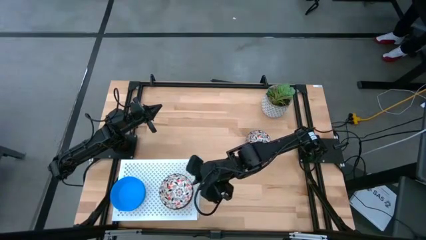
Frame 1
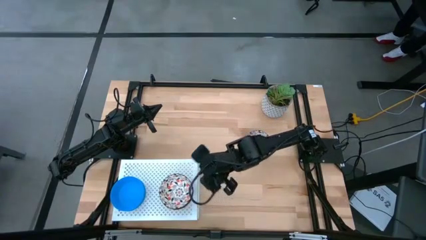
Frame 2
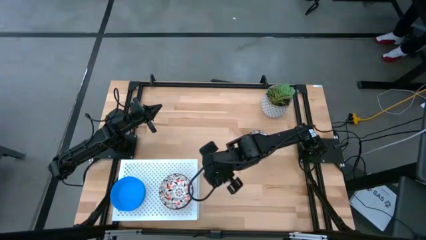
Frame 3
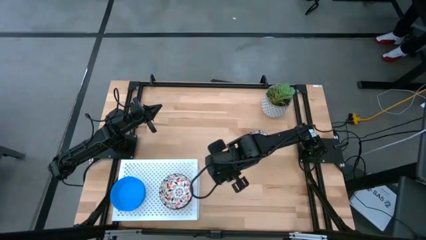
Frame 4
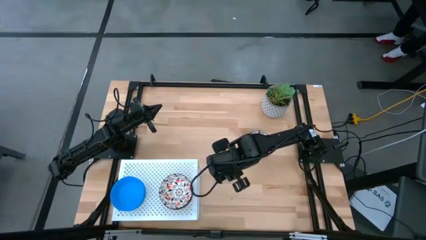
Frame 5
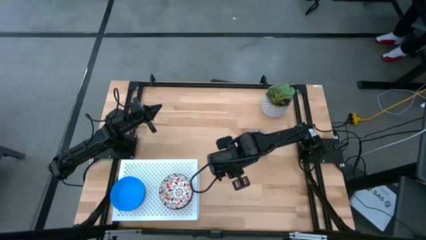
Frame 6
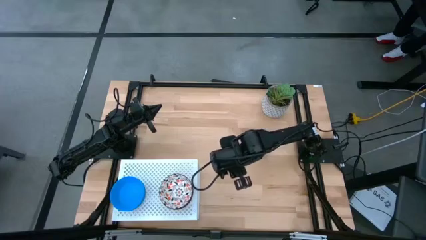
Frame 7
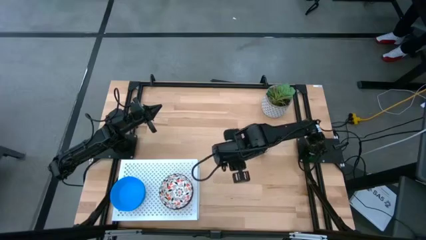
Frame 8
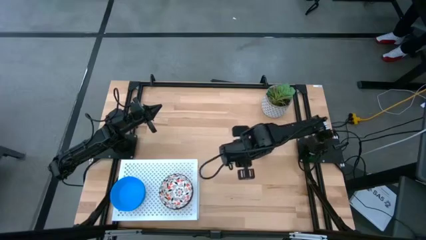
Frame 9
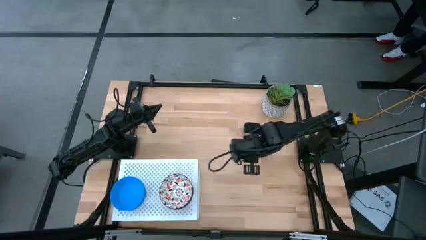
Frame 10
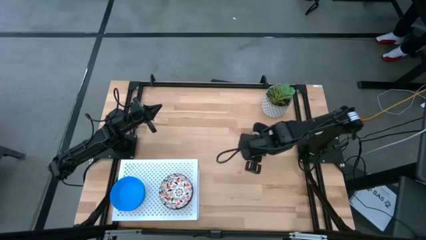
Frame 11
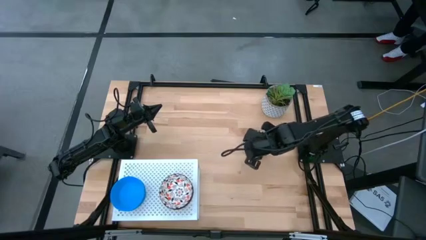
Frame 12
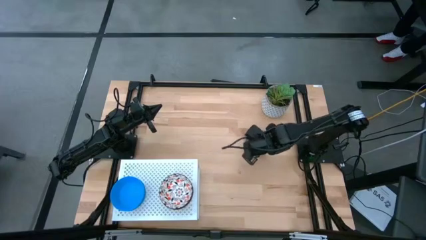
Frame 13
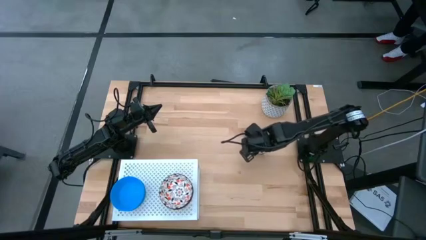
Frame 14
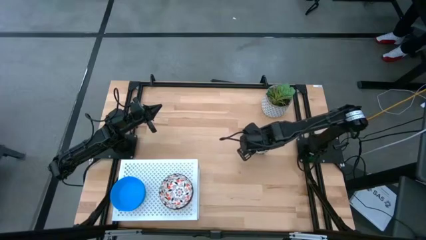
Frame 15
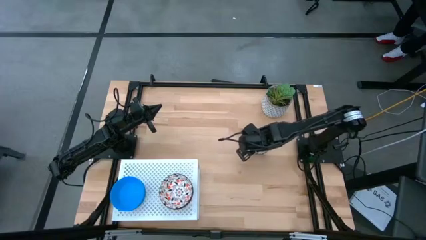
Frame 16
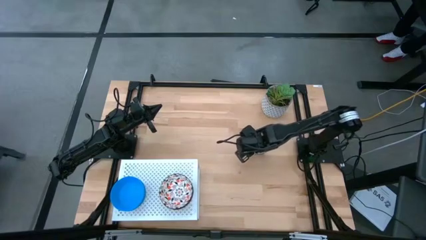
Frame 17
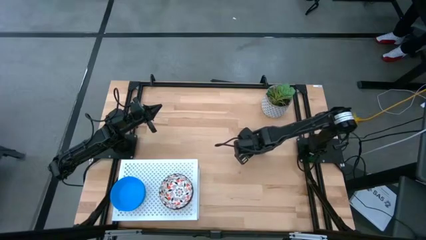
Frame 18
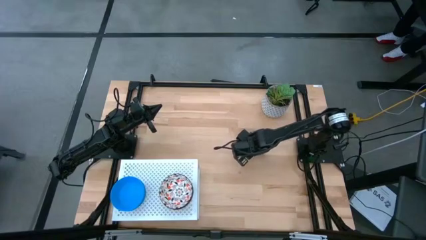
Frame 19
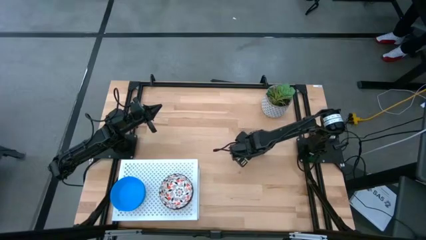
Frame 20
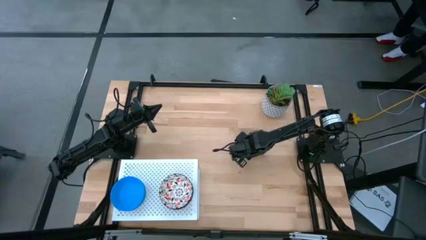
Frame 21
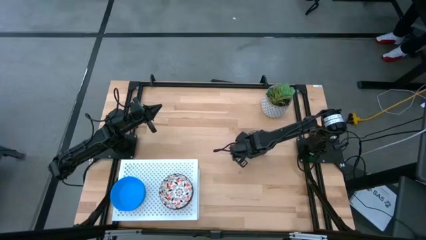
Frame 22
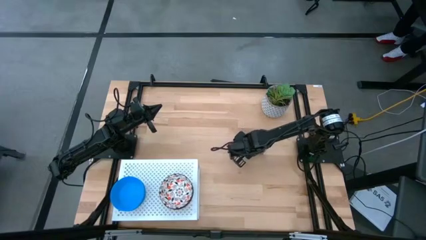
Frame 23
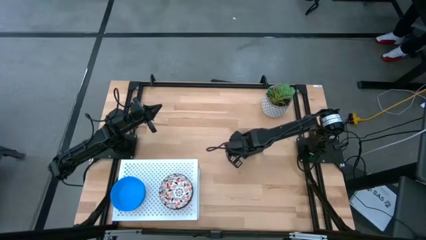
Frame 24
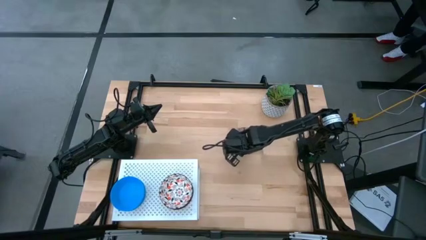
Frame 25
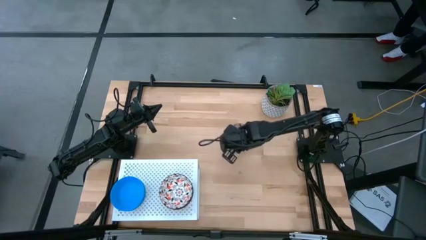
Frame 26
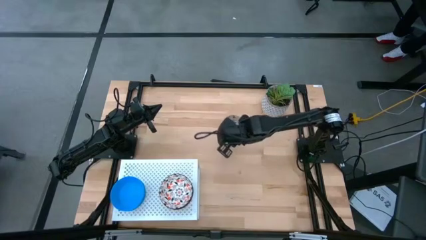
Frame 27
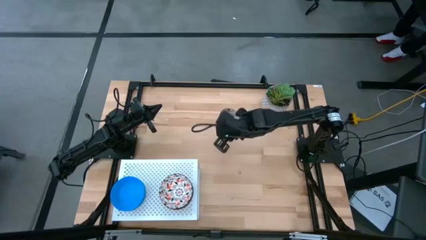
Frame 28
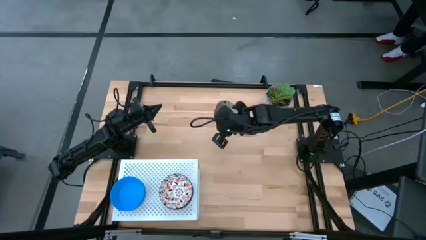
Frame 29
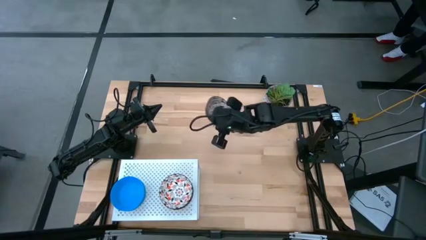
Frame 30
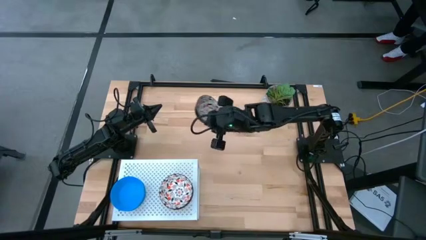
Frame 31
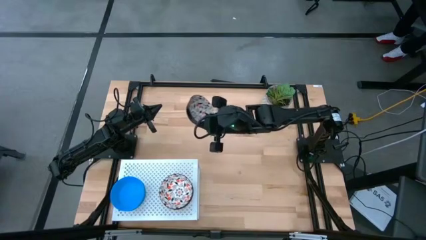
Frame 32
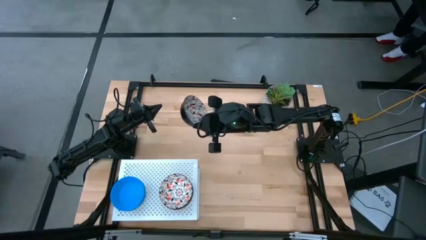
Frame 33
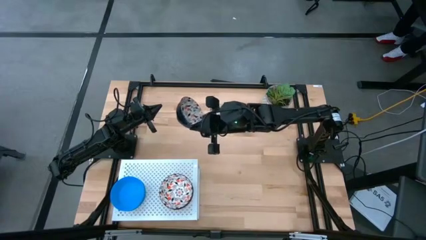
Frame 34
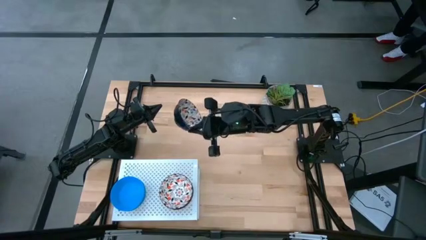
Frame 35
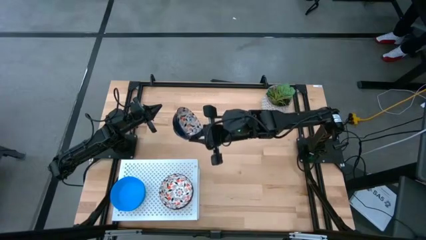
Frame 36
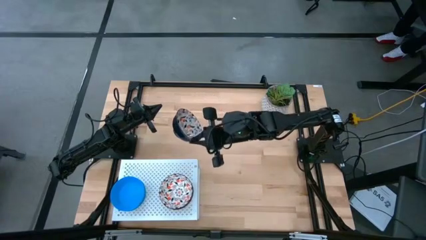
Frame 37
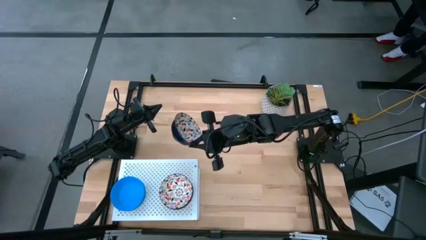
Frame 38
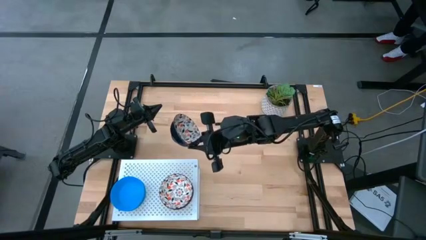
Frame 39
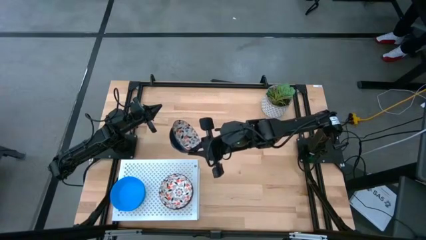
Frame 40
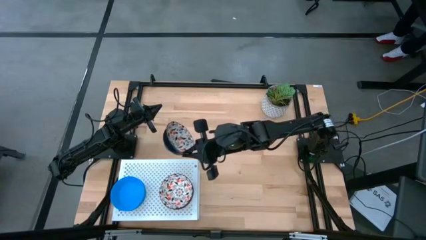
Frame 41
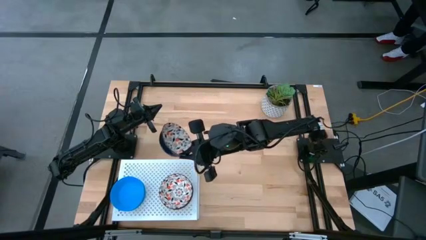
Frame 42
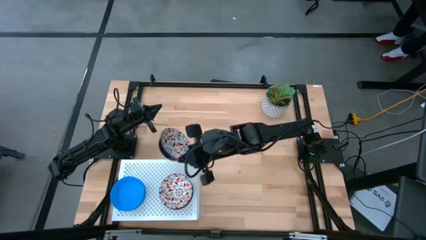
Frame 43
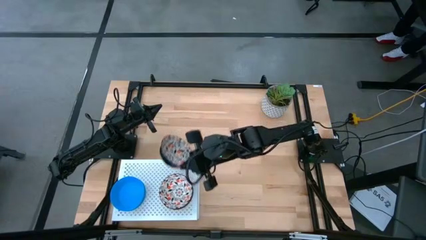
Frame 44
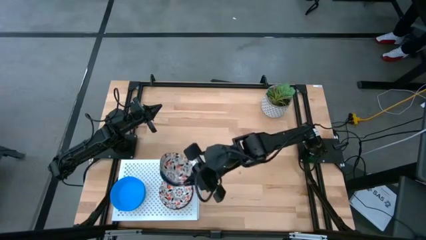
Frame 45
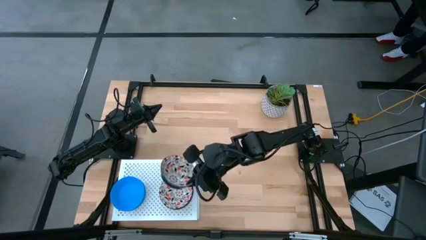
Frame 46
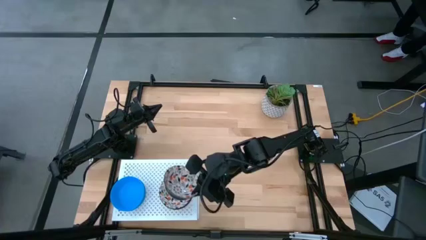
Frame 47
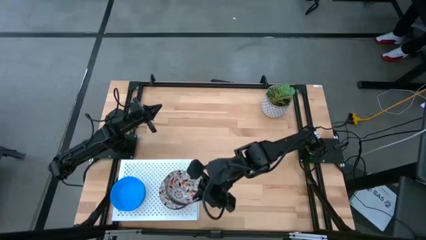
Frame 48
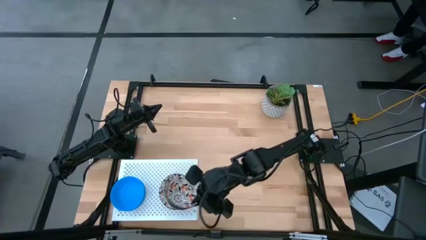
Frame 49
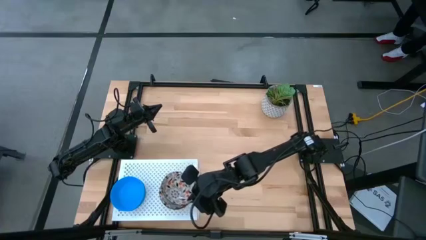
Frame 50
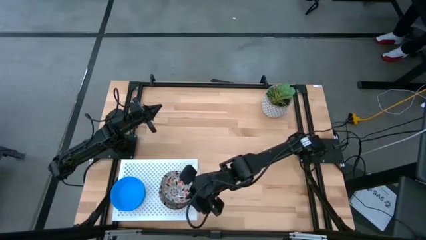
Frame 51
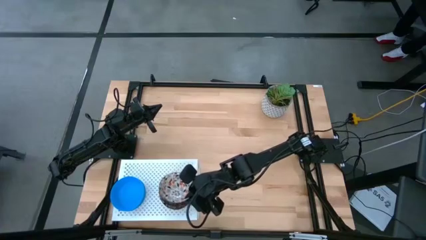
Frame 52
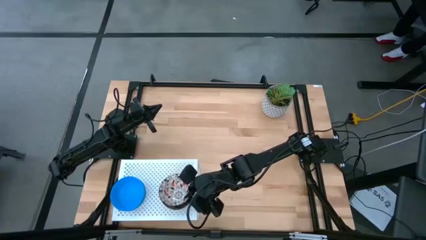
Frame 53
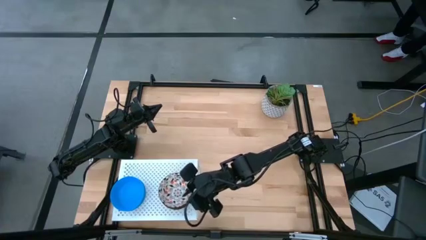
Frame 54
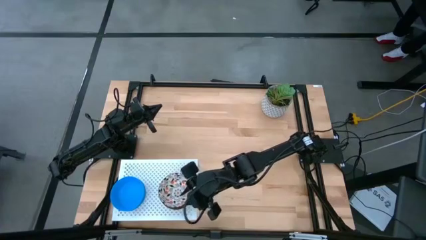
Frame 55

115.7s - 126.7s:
Task: Pick & Place Mini bowls
Stack the patterned bowl on the stacked patterned bowls on the shelf

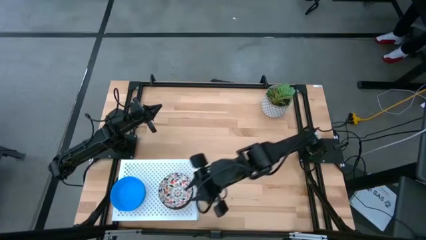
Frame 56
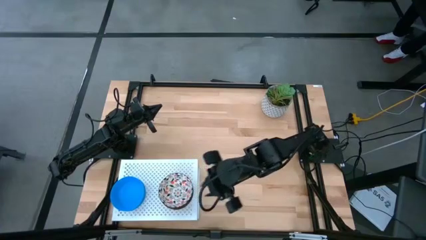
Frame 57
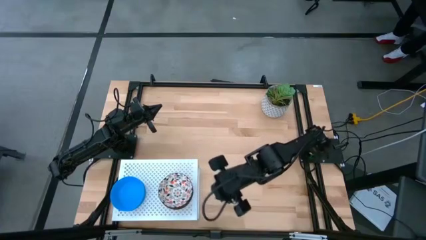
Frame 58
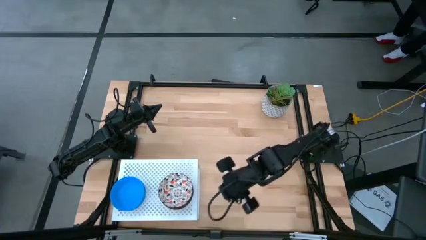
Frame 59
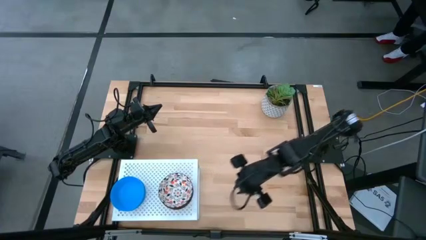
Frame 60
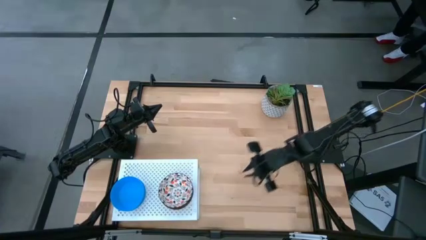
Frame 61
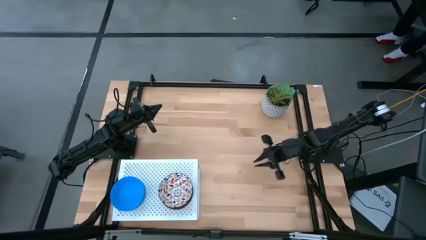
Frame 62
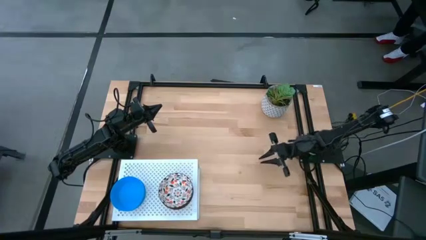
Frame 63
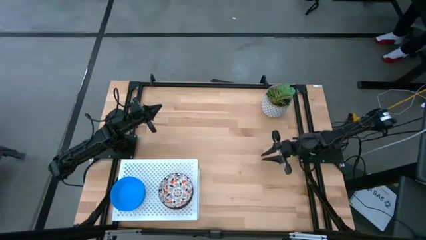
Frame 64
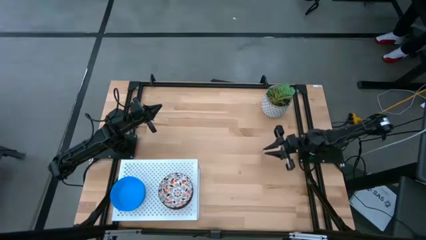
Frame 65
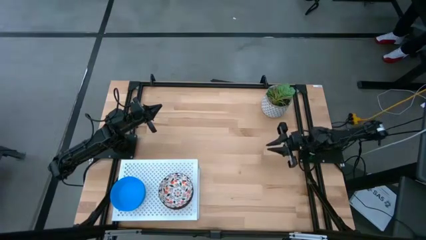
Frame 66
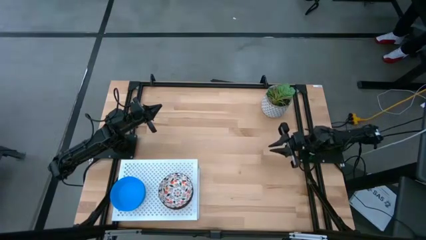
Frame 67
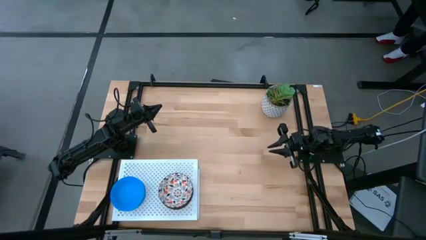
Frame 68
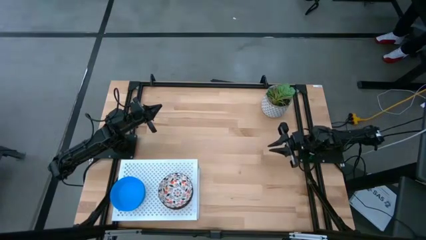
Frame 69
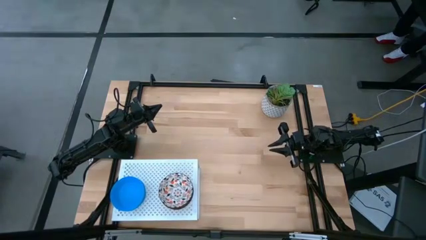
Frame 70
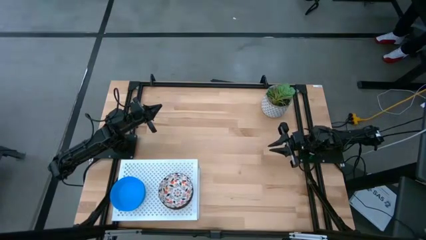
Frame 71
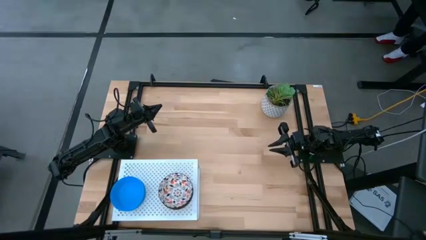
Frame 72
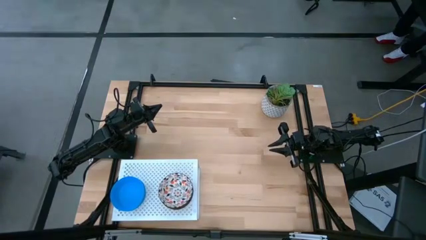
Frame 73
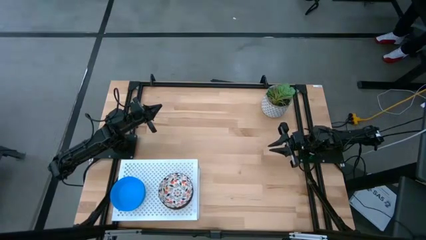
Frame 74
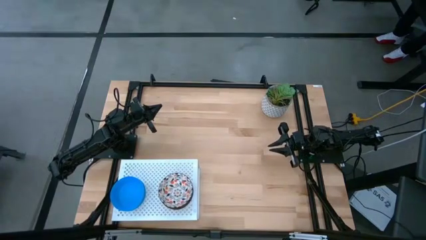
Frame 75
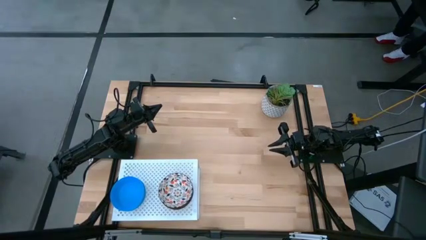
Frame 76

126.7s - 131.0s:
Return to Home Position

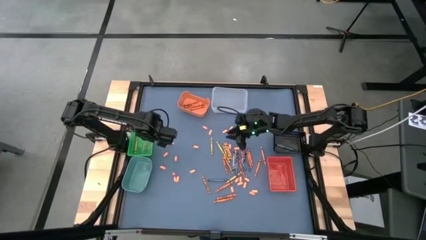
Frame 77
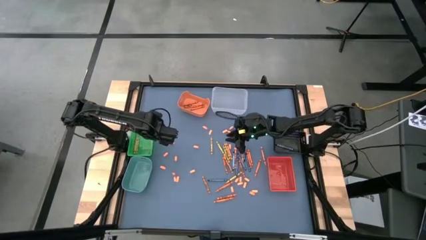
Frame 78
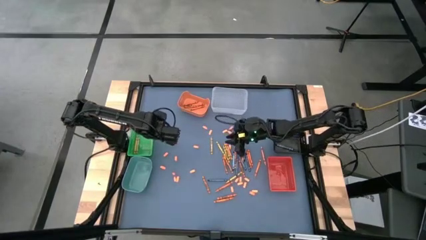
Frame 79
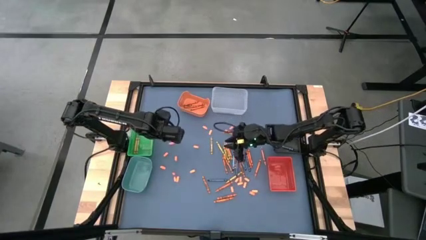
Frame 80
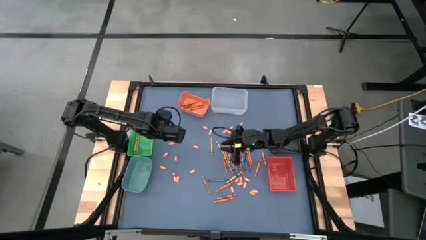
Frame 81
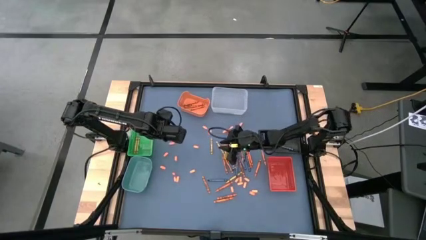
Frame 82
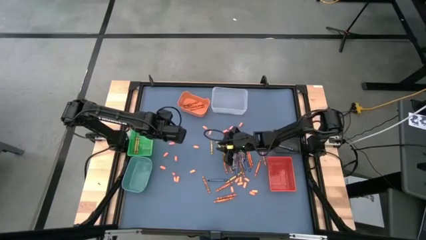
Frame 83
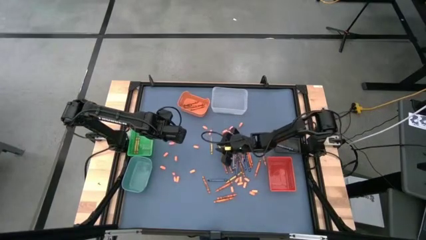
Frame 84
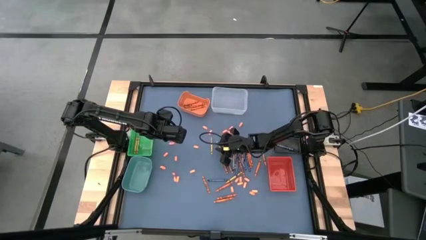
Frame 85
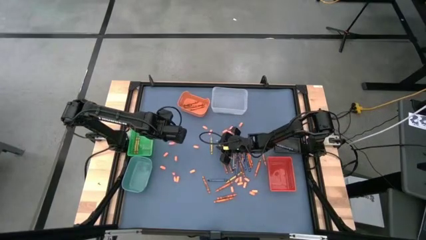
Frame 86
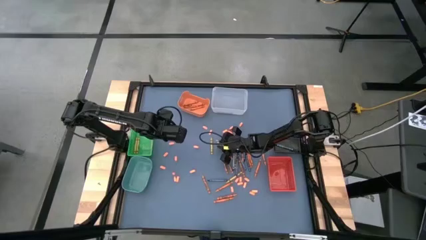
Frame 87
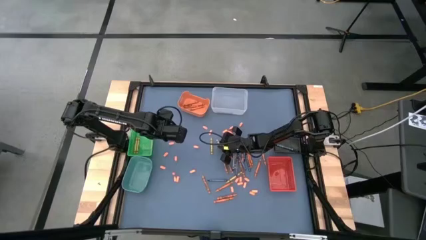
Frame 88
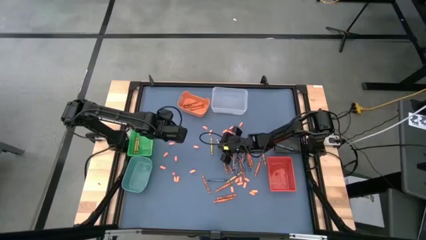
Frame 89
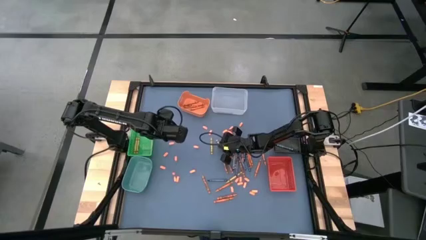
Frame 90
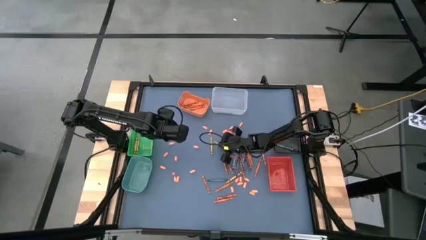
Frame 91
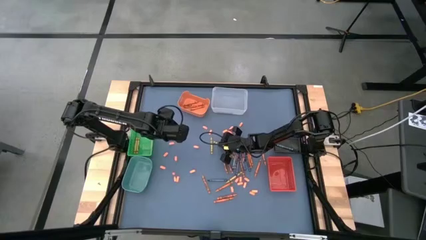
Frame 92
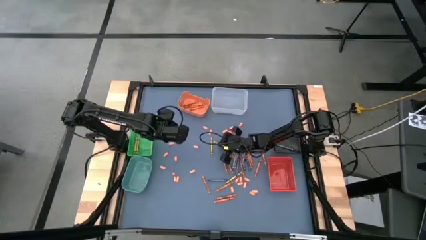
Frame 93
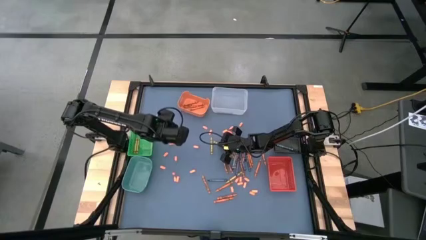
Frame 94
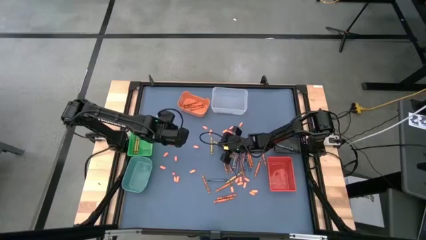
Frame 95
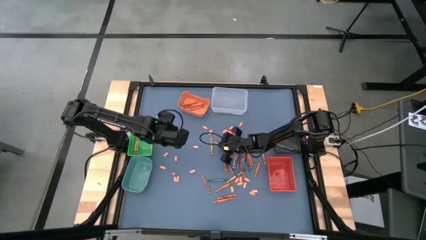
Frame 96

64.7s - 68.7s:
Task: Sort crayons
Put the yellow crayon into the green bin
